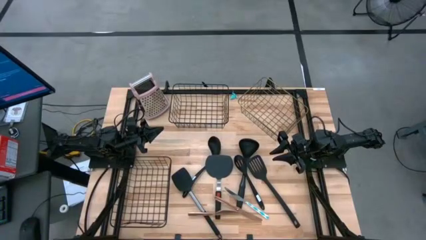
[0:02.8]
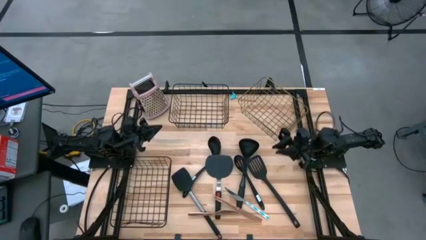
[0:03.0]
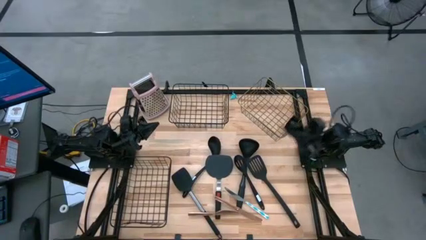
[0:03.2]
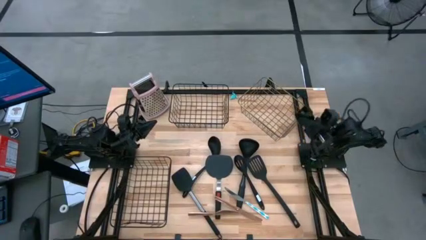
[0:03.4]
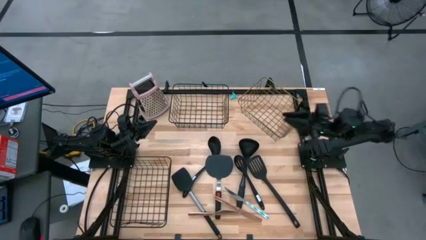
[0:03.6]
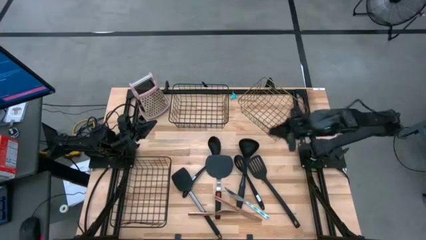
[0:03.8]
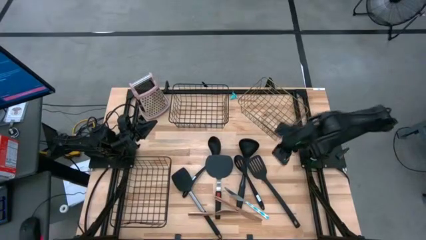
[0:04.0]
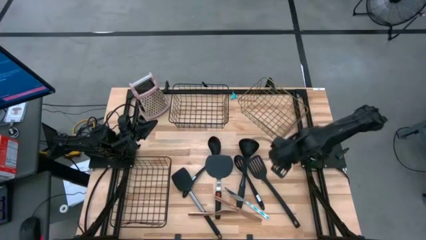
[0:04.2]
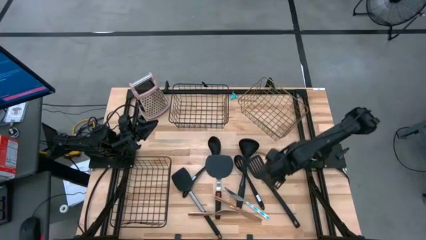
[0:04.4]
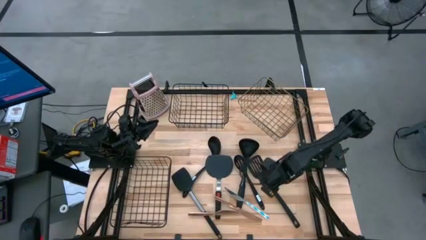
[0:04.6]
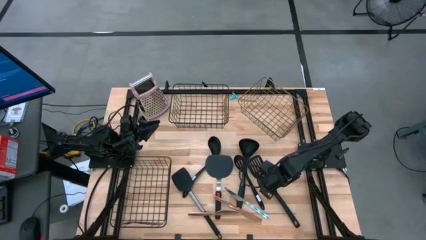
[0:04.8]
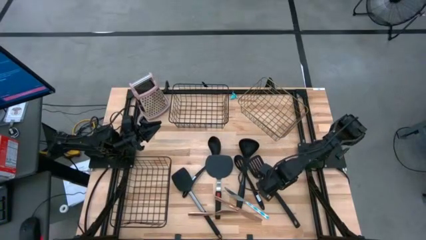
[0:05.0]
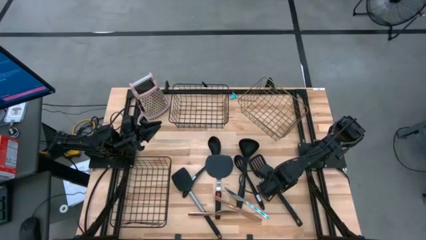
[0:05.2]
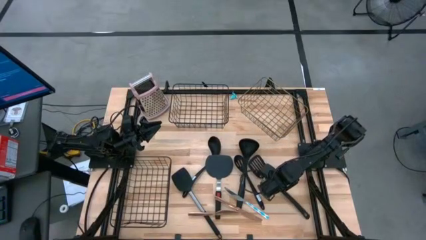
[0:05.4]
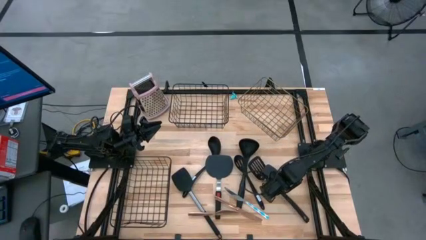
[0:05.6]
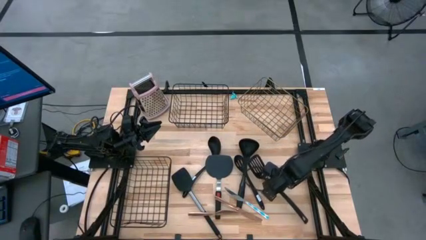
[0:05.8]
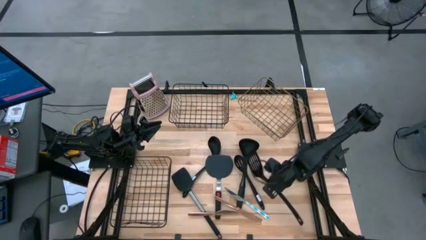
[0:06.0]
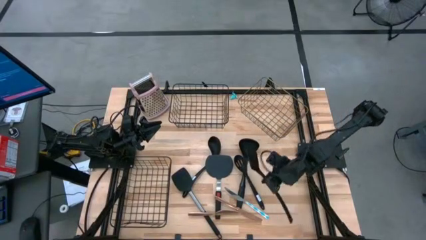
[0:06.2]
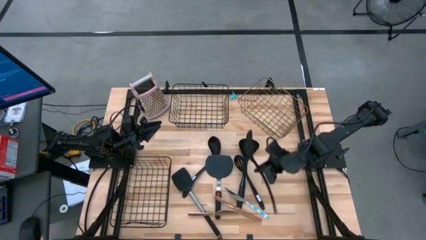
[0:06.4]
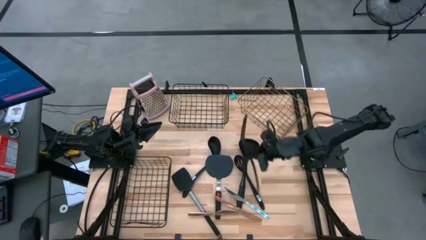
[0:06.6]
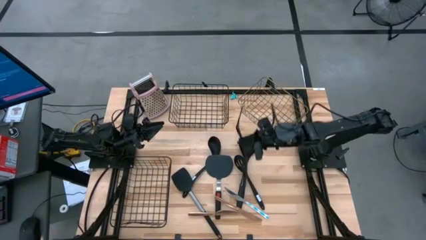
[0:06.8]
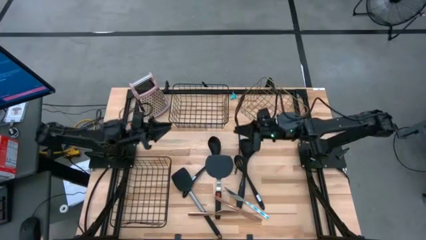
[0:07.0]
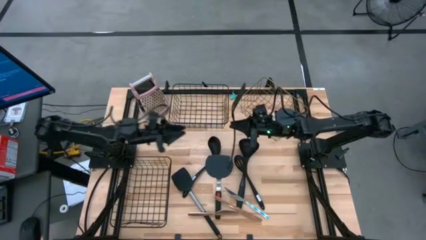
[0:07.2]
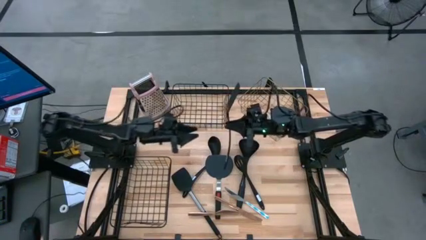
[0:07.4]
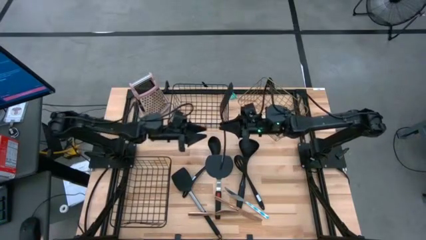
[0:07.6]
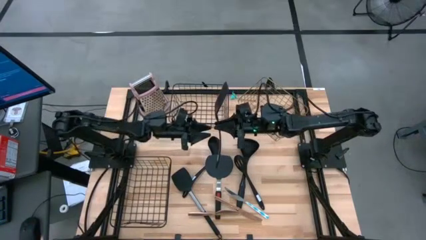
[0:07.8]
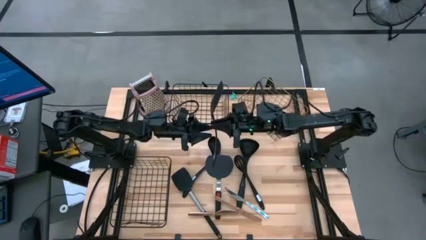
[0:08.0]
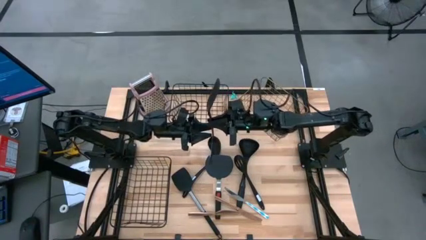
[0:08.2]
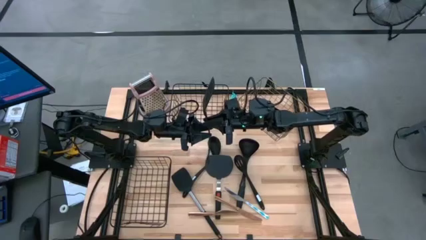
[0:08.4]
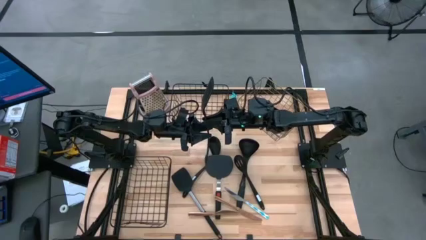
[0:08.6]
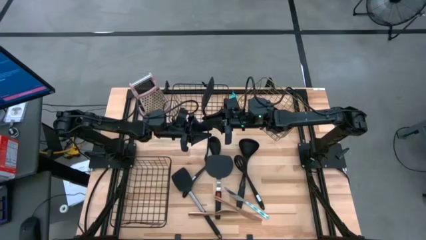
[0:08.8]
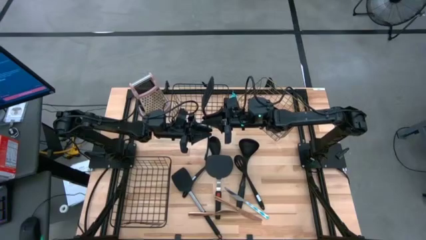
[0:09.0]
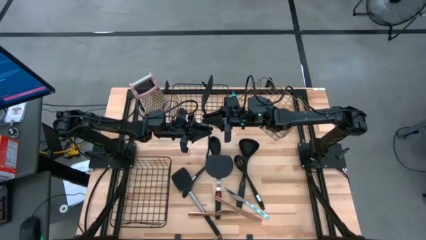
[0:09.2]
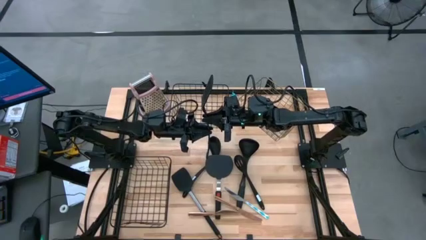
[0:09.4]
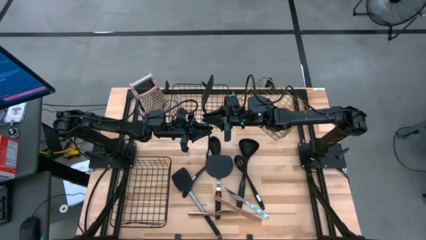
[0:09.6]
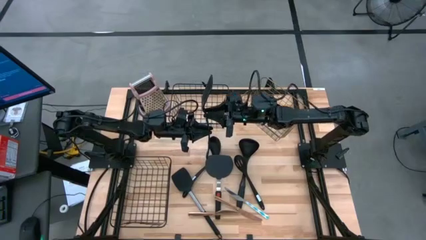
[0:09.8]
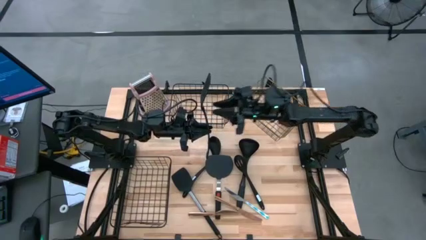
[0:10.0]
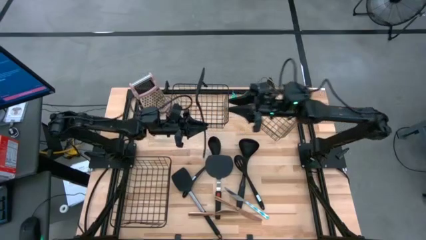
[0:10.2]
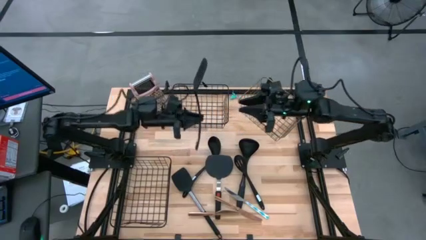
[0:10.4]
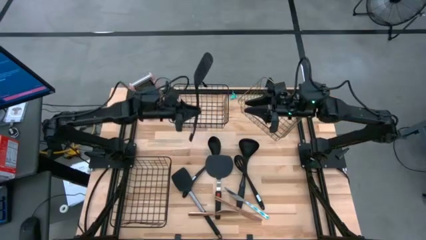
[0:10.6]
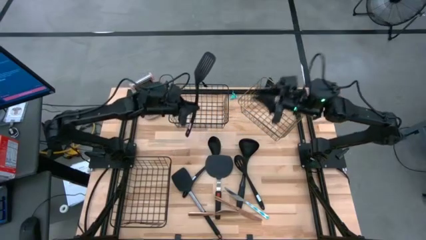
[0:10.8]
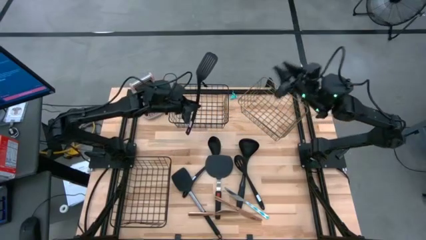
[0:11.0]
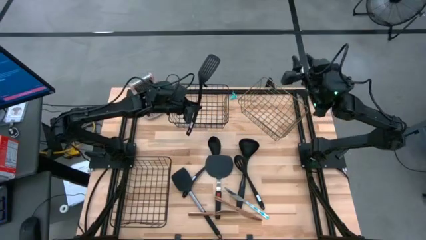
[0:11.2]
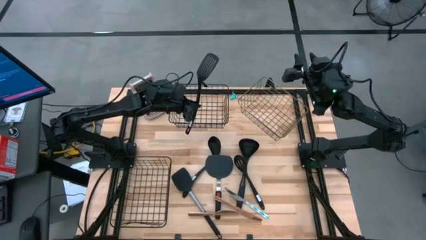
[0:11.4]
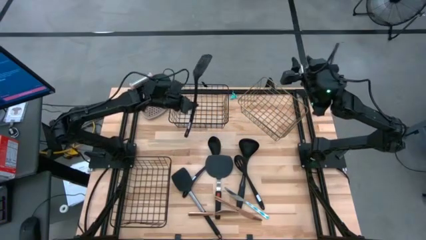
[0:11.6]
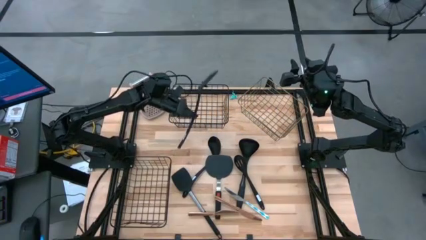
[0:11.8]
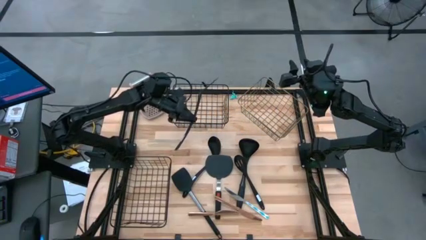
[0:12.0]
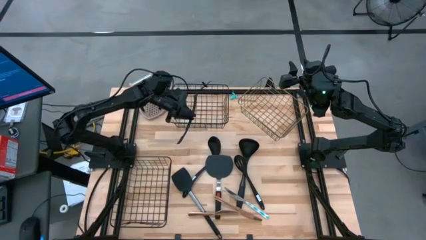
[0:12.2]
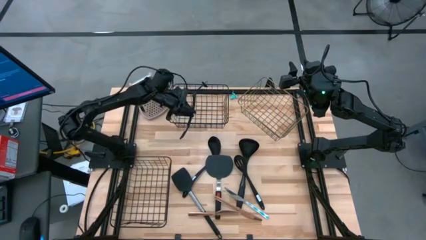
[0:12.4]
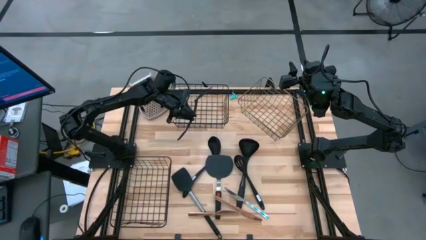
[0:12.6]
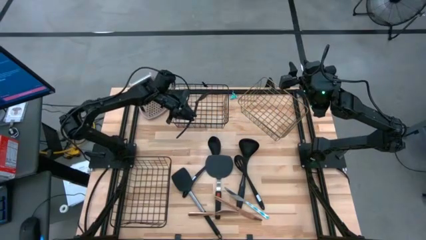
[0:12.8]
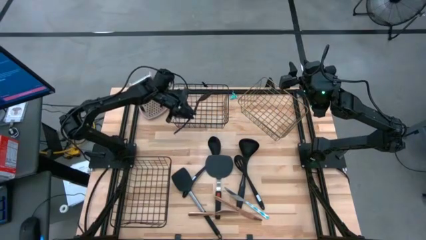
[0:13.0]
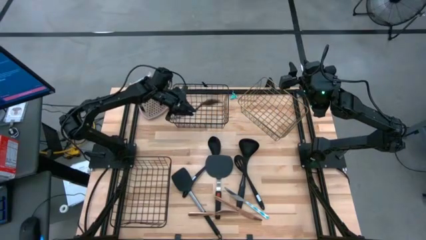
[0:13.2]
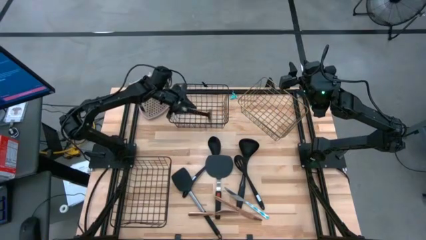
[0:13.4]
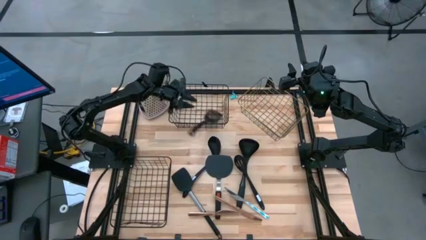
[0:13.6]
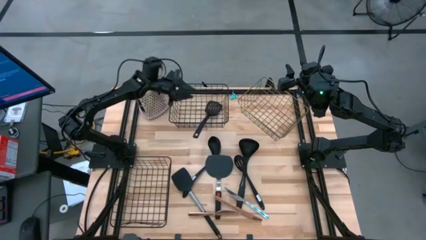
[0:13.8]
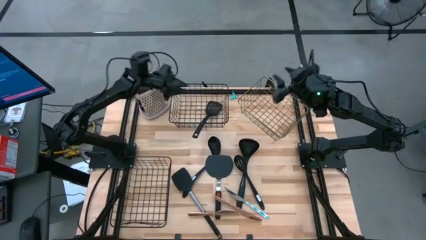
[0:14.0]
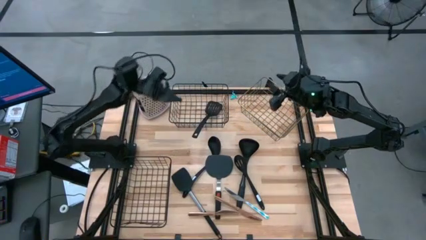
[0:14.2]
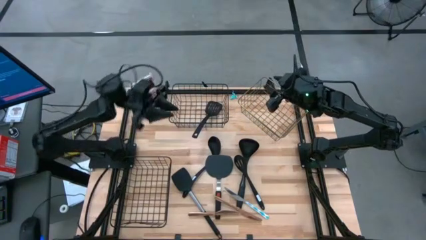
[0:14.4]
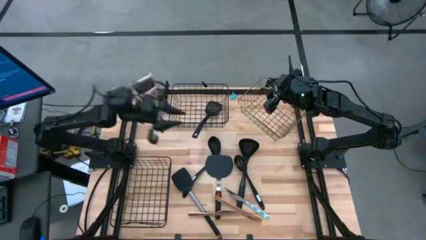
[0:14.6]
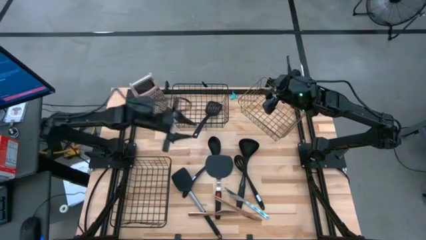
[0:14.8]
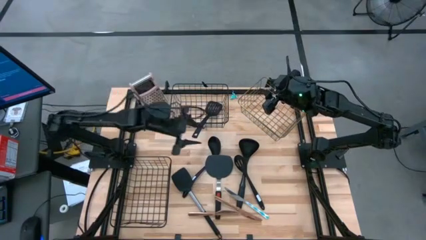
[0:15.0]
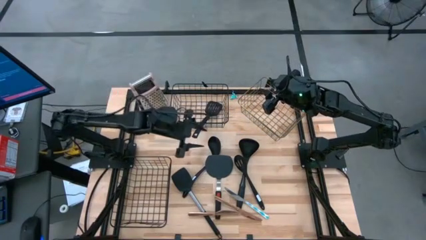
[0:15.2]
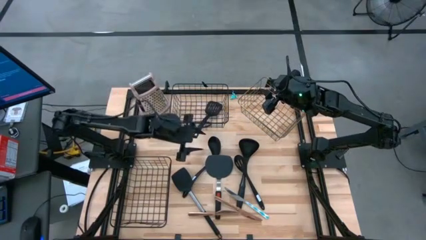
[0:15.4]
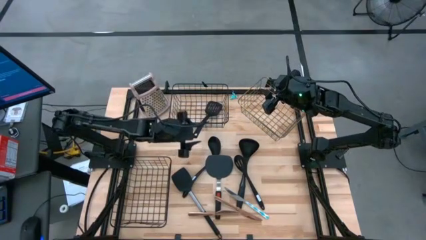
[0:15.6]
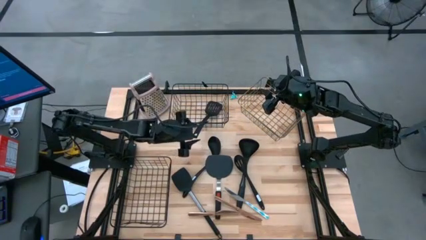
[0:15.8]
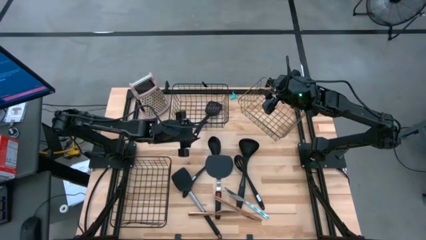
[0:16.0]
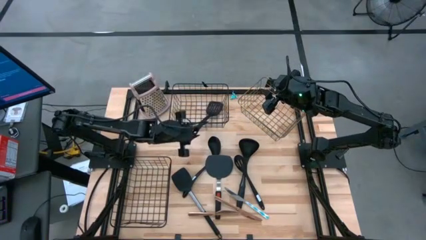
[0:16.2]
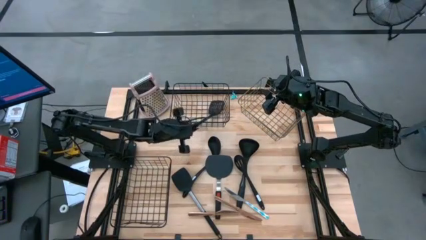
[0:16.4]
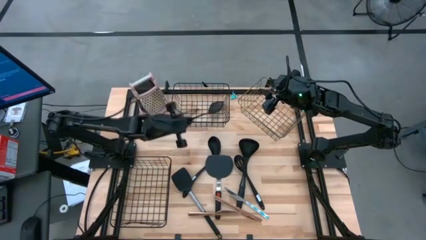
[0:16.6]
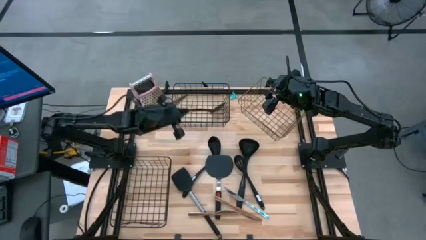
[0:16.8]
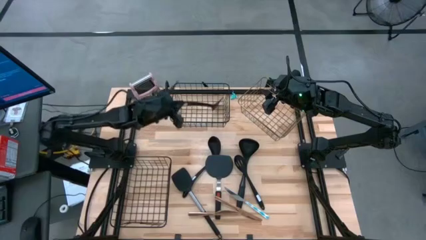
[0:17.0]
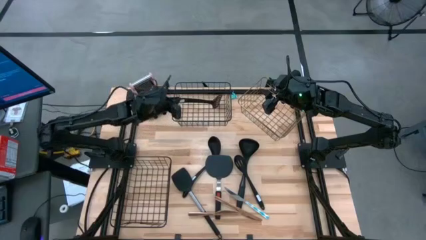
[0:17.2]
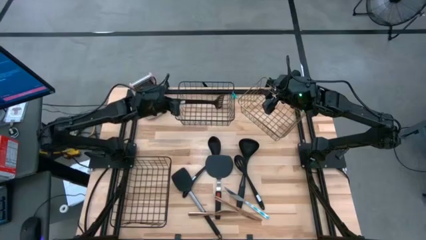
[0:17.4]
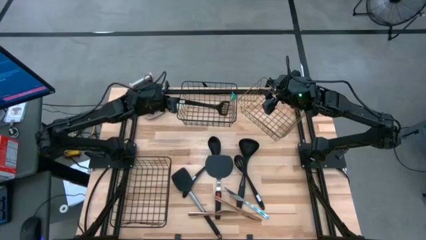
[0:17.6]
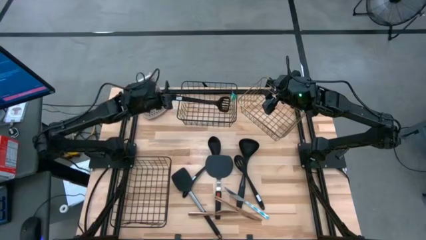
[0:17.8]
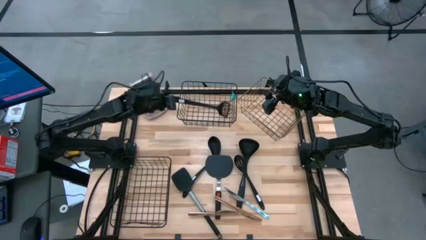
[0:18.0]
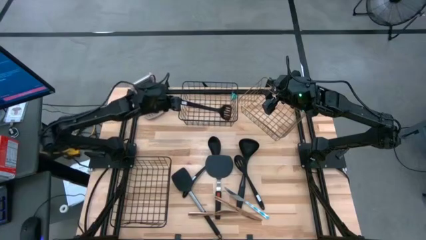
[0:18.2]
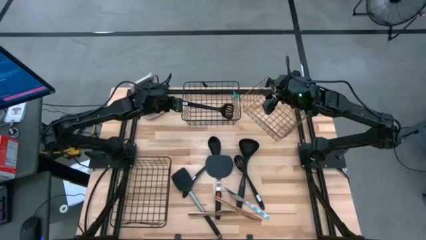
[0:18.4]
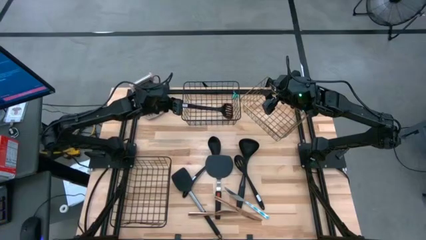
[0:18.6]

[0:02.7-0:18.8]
Task: Pick & Place Kitchen Items
Put the black slotted spatula into the top left wire basket
